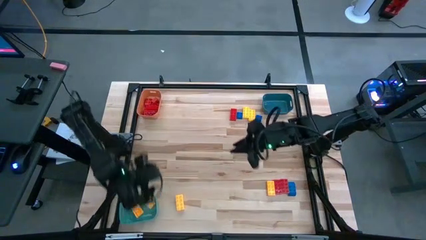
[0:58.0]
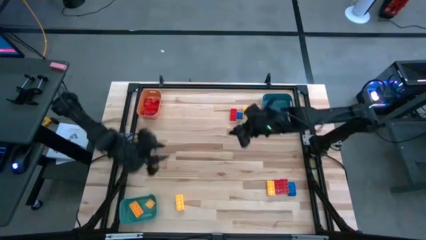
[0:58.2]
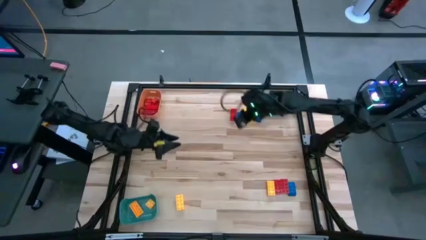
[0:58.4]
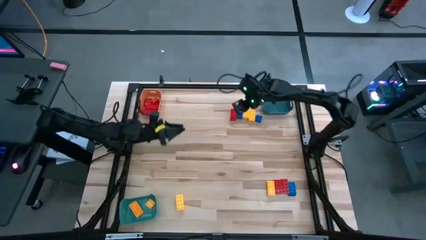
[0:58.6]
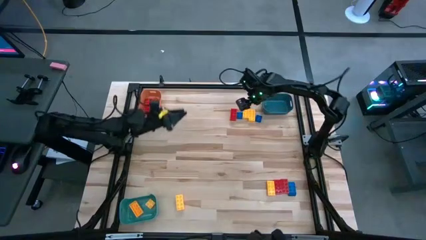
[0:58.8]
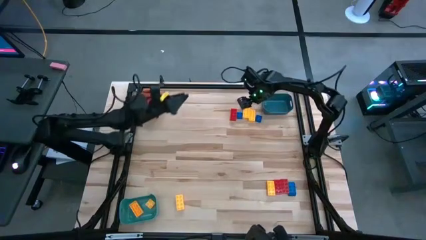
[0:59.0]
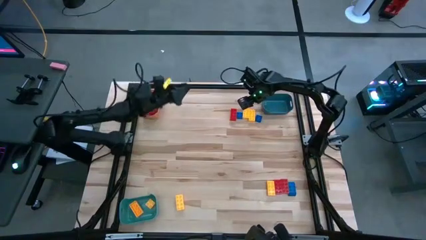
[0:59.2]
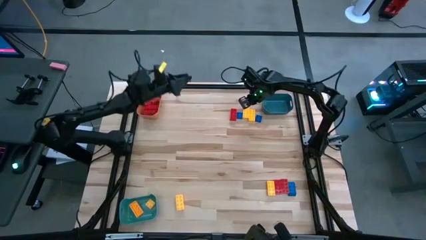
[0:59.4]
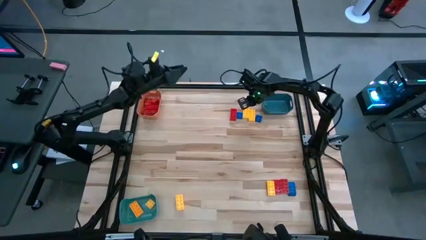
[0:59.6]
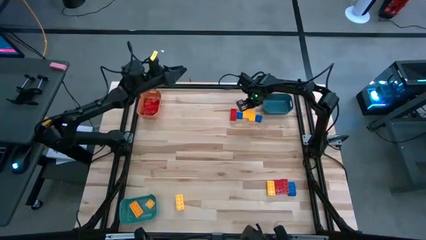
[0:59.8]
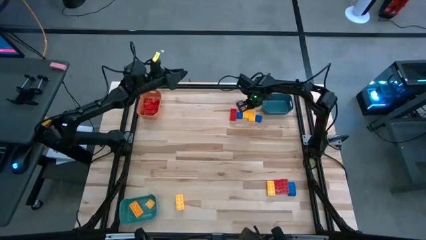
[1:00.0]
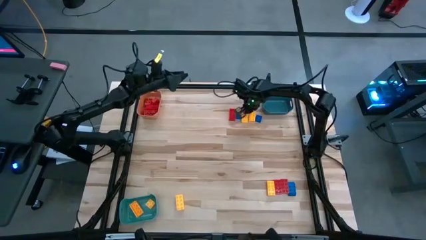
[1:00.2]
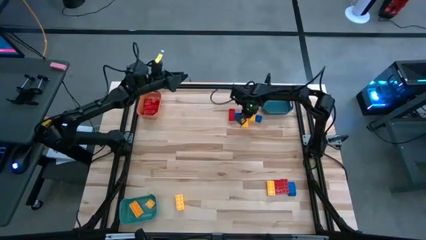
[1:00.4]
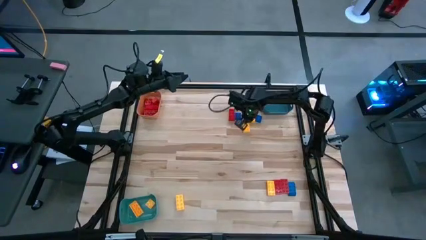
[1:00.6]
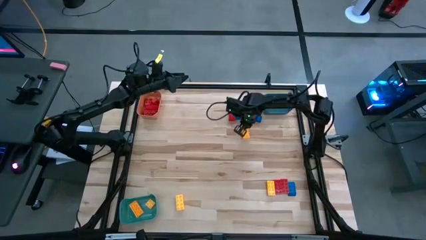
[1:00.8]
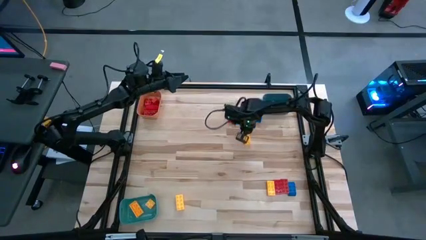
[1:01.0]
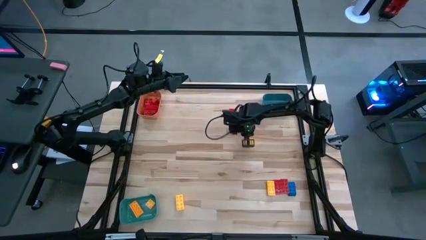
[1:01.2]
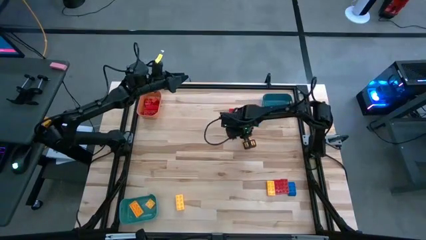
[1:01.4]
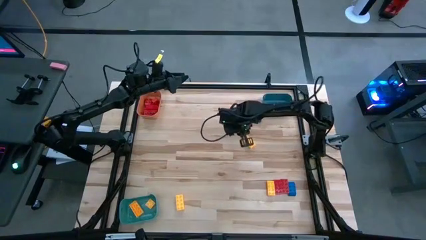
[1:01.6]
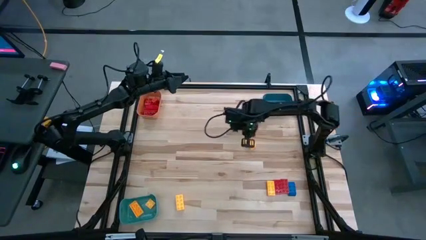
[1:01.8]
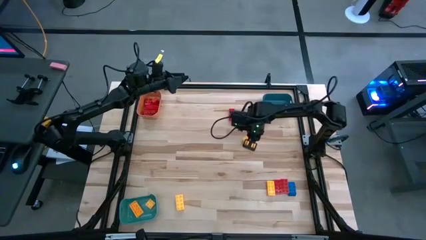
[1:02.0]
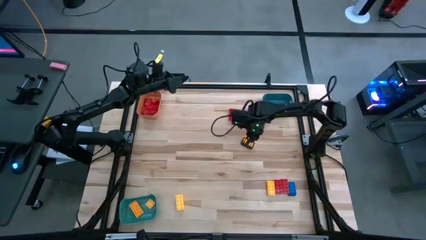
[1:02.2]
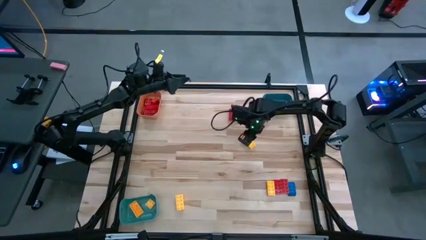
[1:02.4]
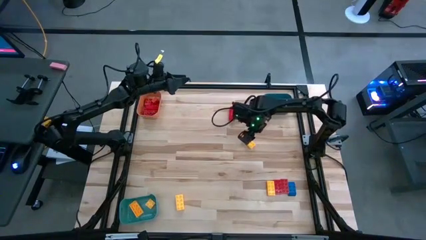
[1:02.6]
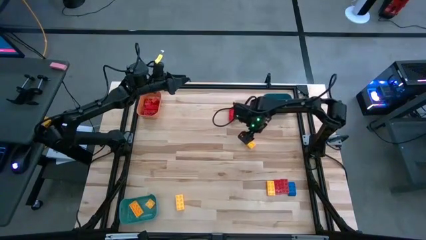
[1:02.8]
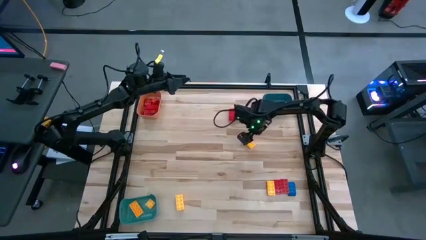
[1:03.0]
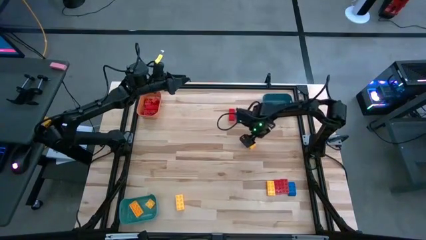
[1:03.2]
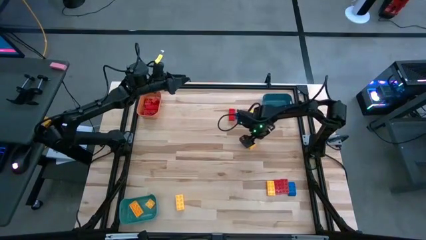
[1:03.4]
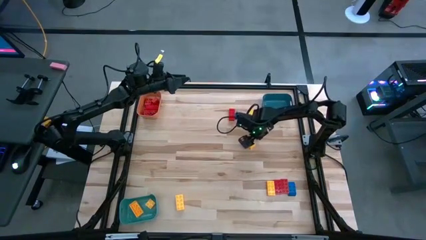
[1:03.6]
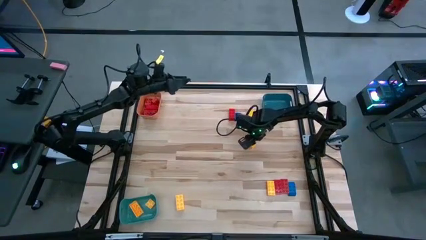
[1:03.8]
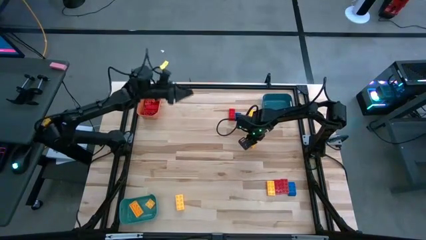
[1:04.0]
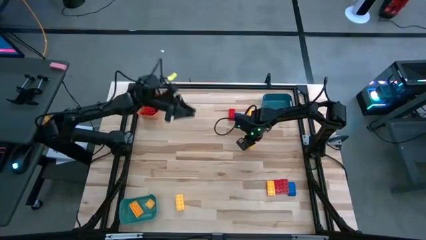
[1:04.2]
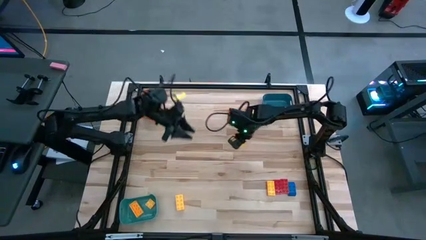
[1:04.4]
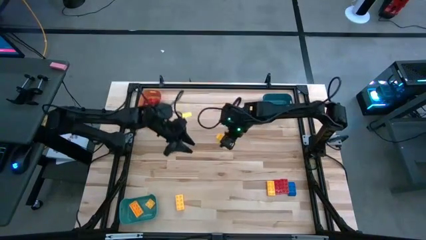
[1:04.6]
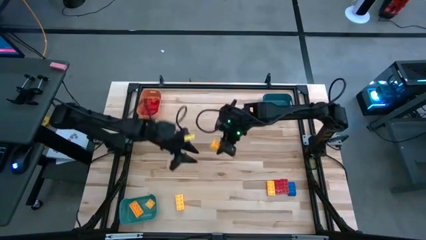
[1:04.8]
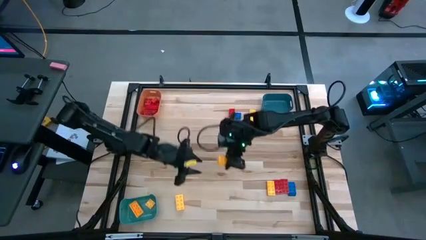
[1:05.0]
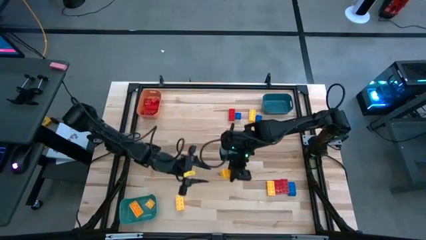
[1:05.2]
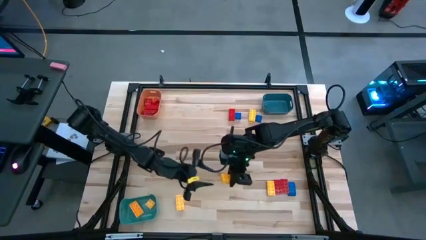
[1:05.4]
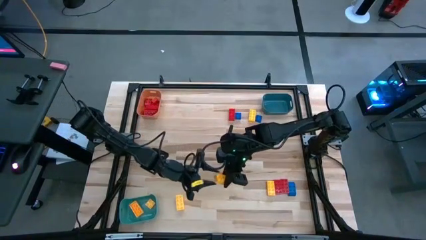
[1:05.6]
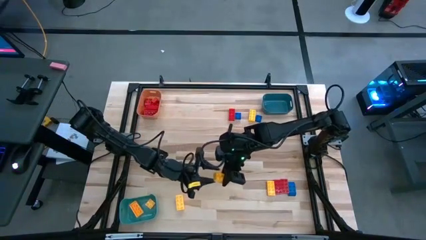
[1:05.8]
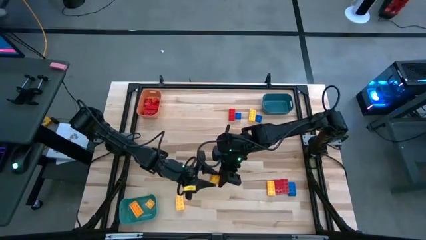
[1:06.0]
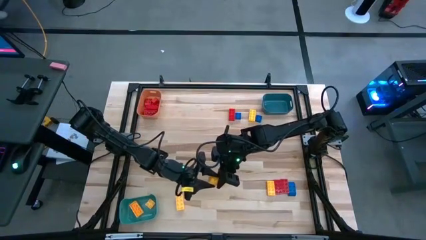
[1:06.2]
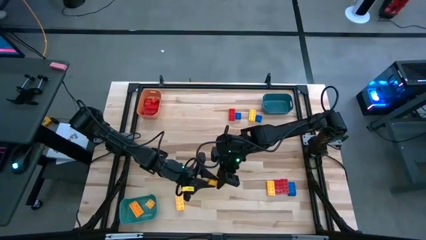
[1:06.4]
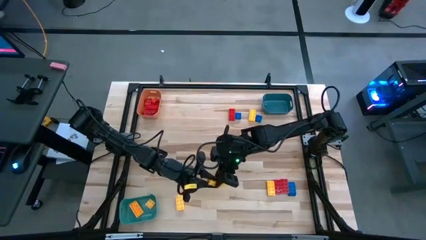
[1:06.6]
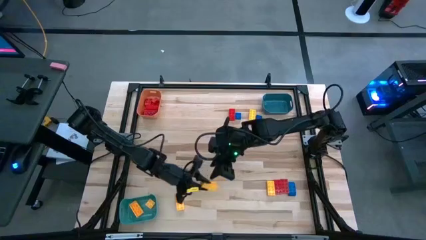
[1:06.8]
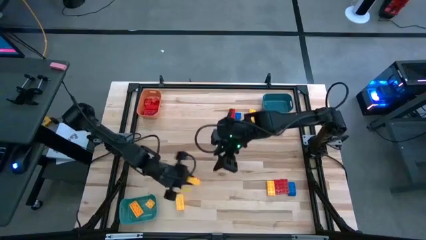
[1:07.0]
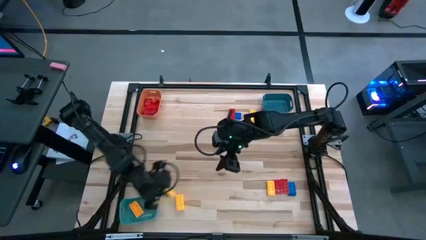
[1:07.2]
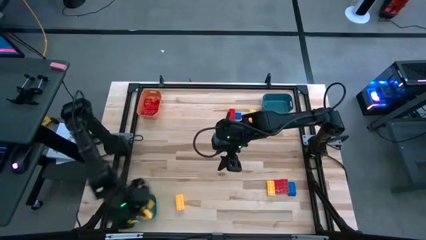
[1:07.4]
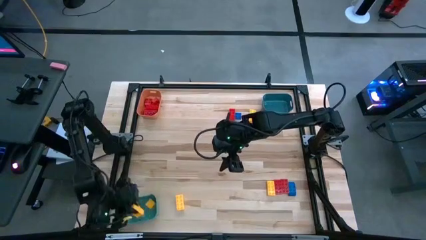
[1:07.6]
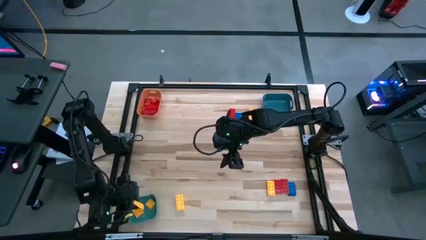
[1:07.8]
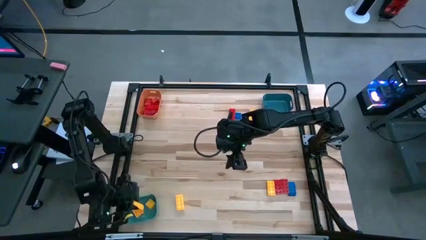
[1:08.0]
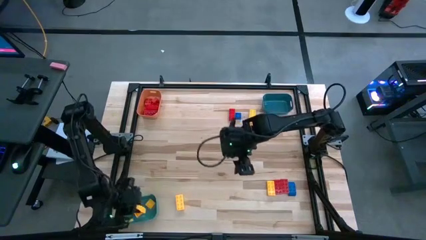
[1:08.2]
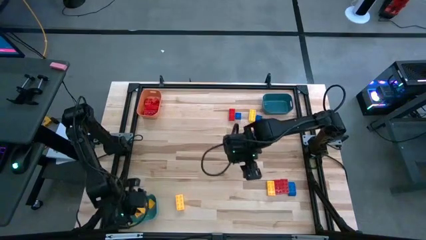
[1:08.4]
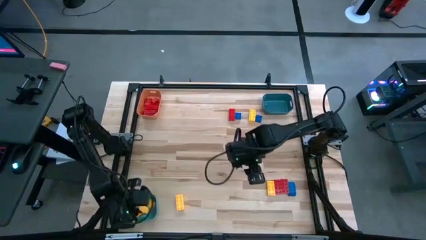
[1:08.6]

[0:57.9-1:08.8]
Task: Sort blocks
Put the yellow game piece into the green bin

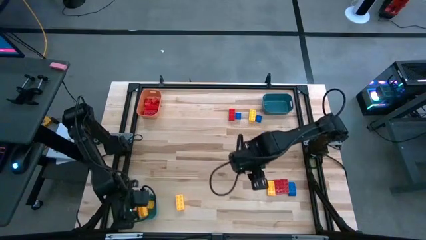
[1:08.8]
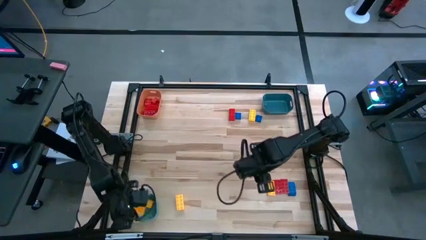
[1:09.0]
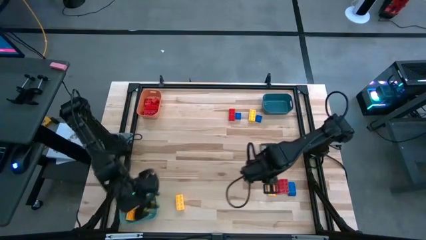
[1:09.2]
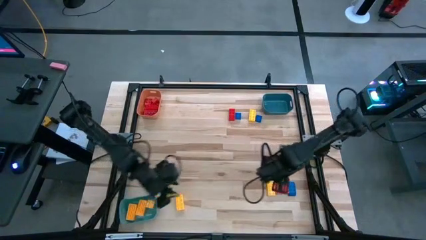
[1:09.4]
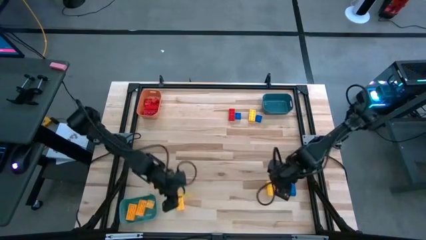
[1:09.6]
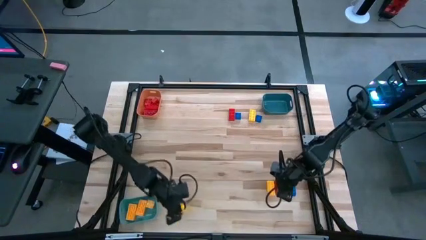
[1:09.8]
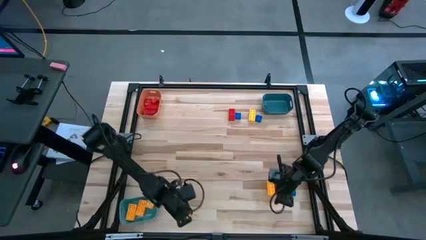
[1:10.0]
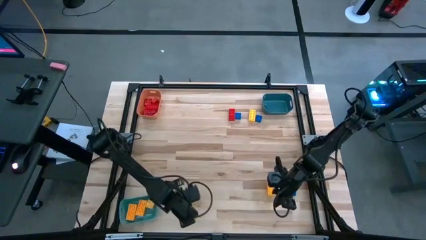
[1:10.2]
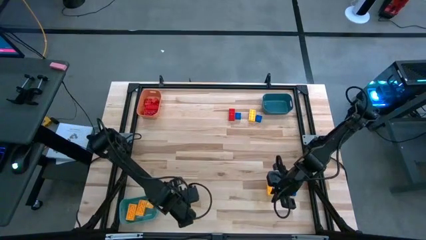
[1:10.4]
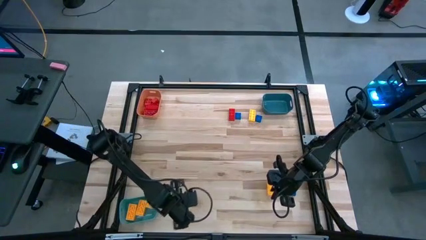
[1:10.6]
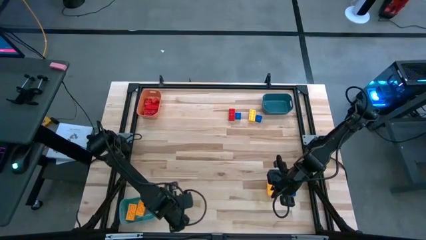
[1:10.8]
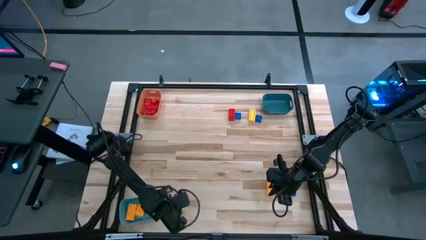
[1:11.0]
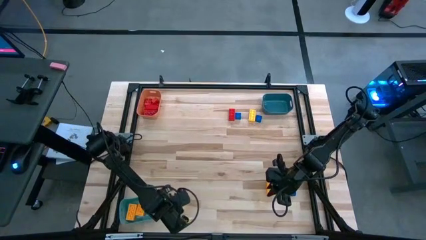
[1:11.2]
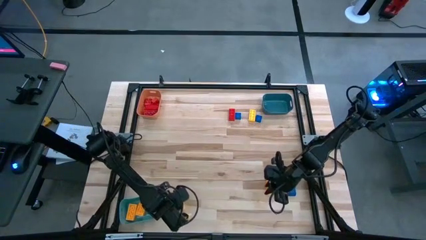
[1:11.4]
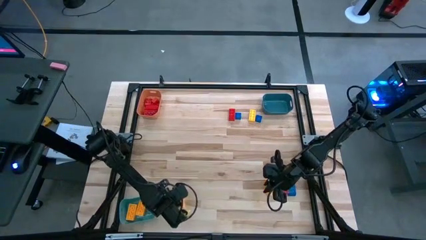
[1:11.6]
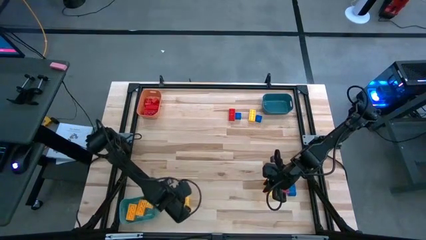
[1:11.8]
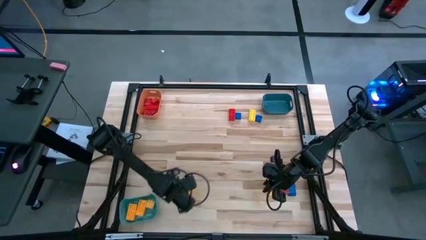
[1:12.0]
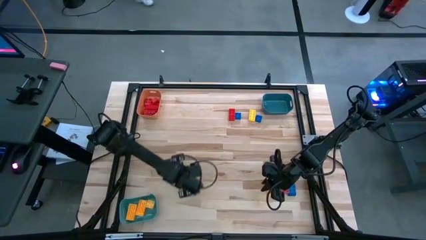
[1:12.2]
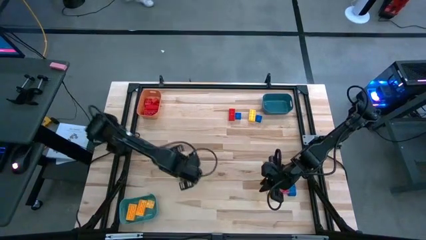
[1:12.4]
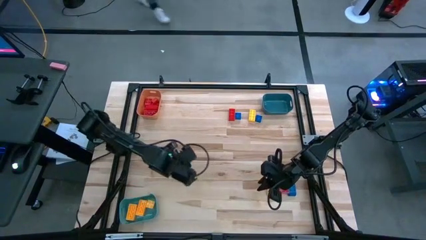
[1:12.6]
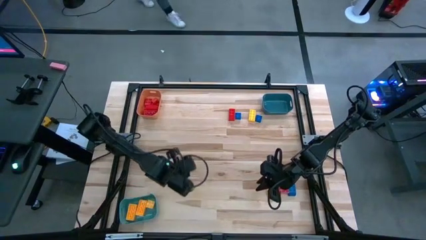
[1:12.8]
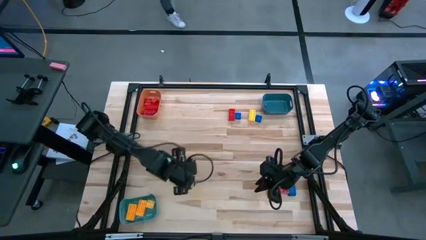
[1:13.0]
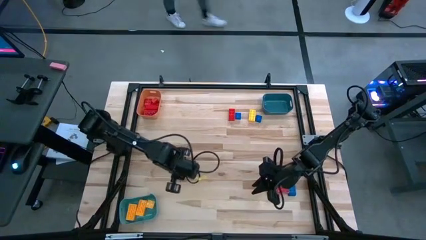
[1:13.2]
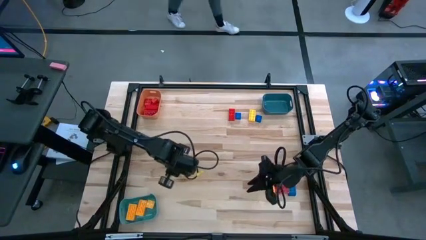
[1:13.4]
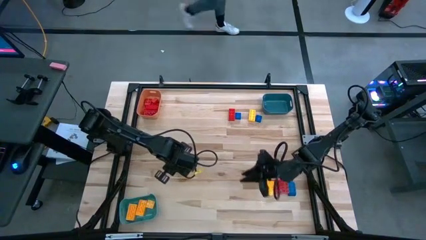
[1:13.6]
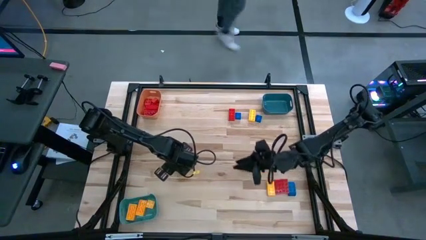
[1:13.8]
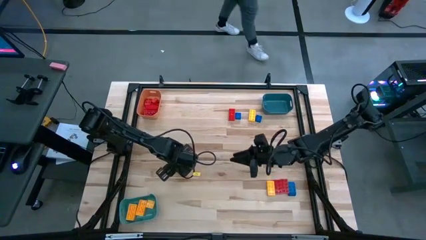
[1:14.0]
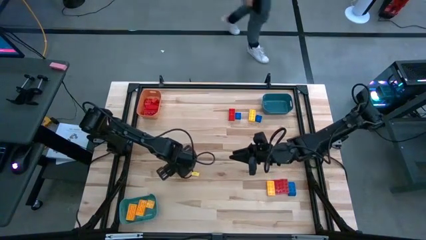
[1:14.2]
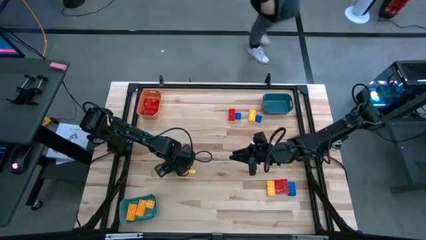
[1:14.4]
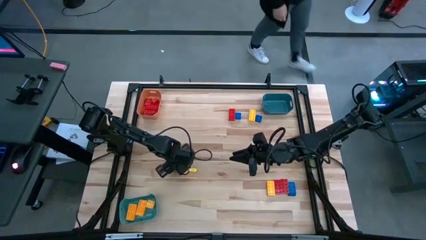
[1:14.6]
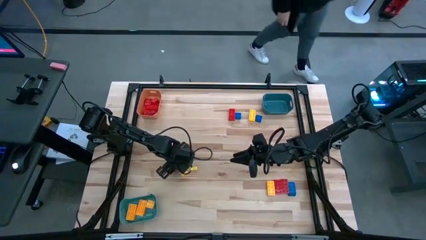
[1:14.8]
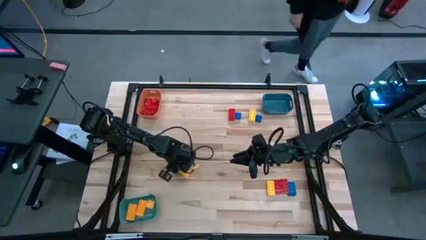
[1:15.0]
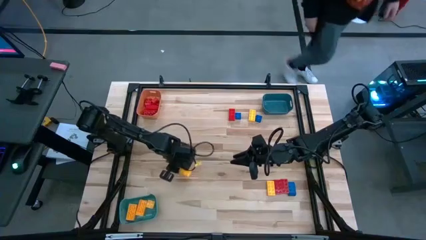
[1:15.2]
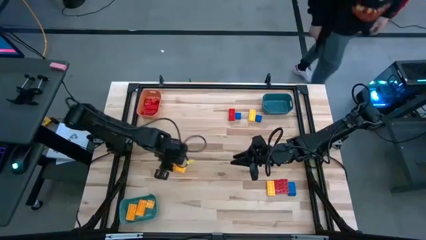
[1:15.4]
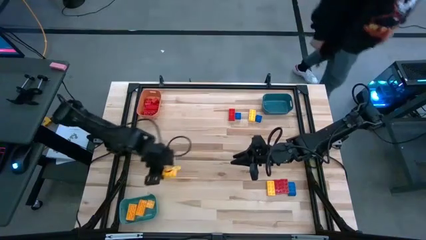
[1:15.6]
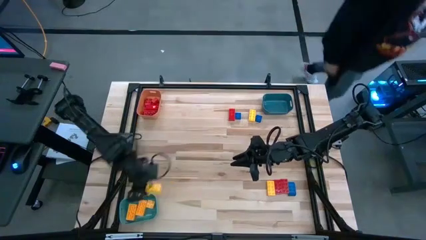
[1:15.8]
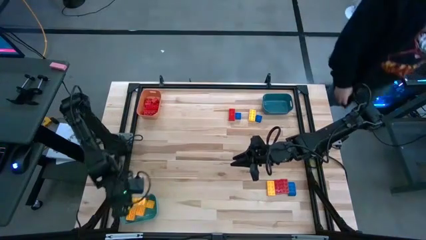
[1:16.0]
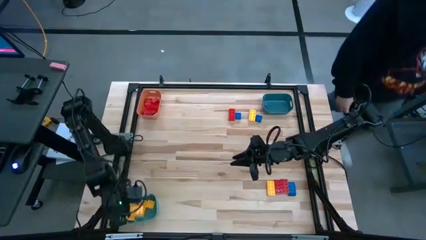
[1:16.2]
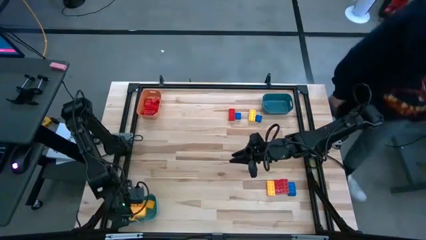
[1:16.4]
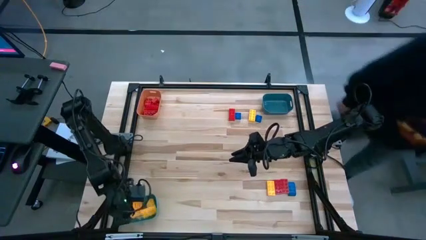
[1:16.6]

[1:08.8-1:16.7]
Put the yellow game piece into the green bin
